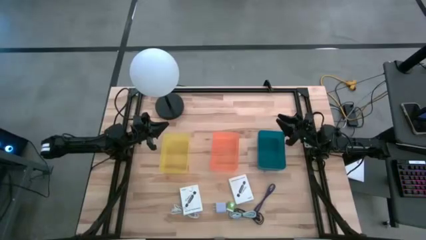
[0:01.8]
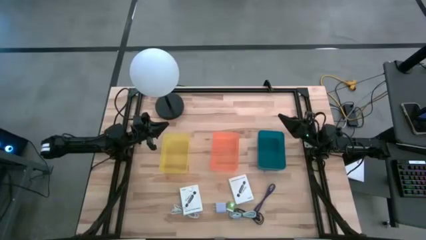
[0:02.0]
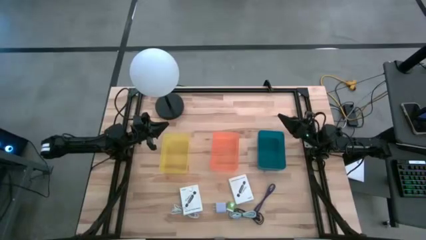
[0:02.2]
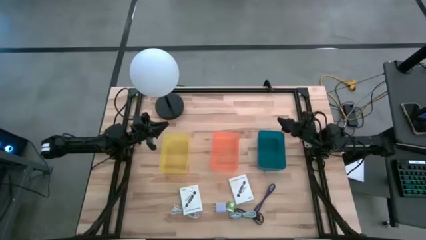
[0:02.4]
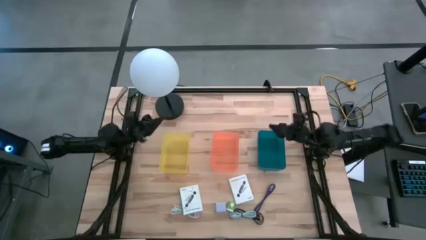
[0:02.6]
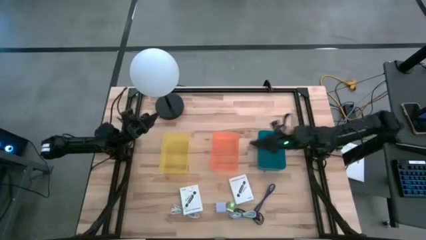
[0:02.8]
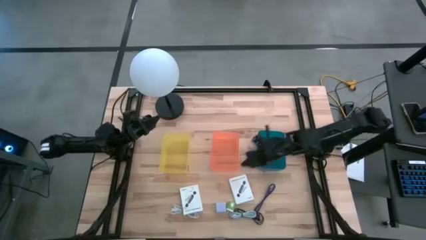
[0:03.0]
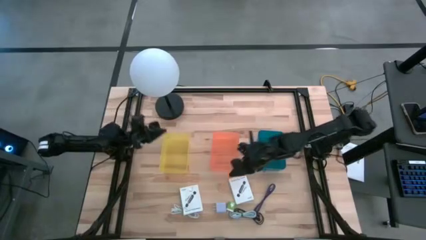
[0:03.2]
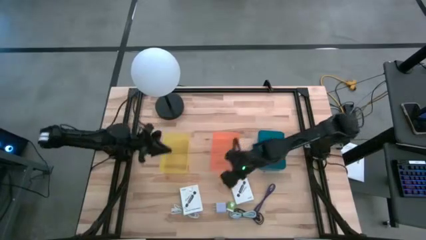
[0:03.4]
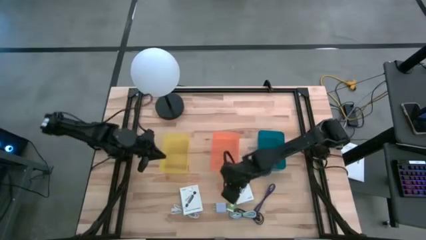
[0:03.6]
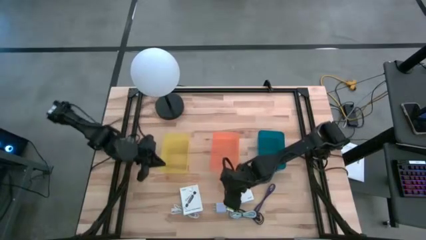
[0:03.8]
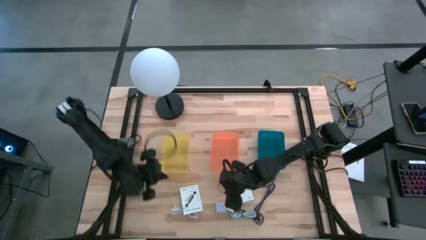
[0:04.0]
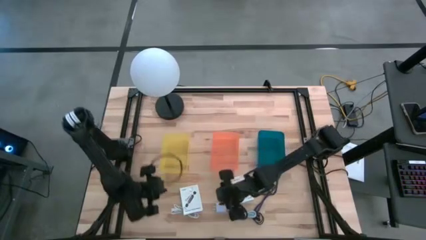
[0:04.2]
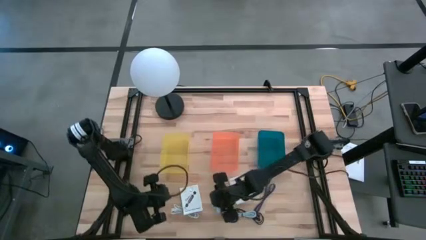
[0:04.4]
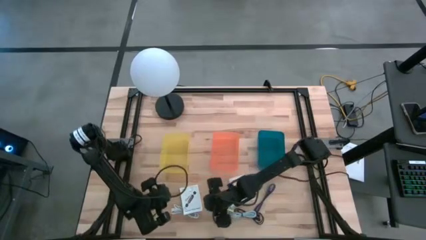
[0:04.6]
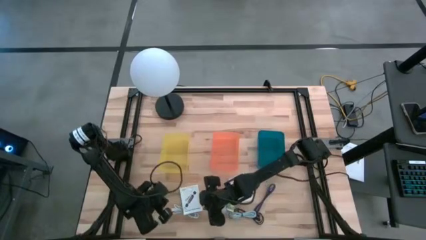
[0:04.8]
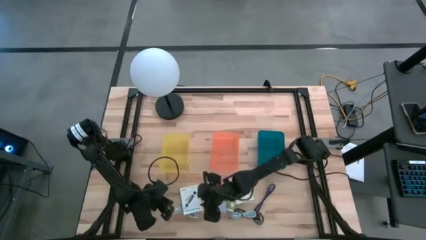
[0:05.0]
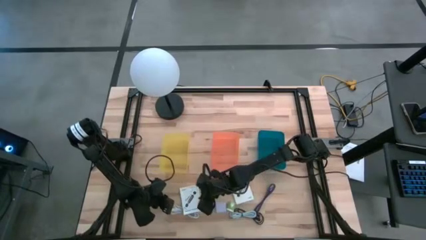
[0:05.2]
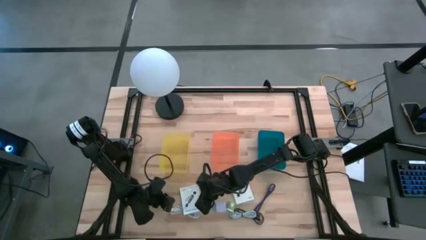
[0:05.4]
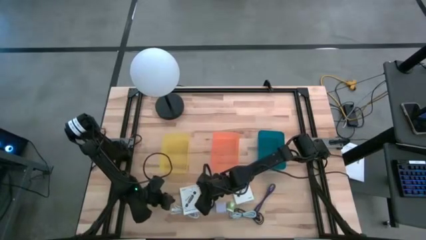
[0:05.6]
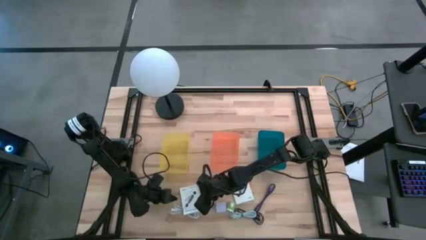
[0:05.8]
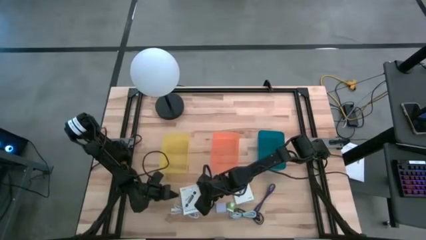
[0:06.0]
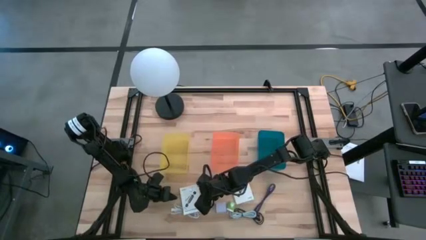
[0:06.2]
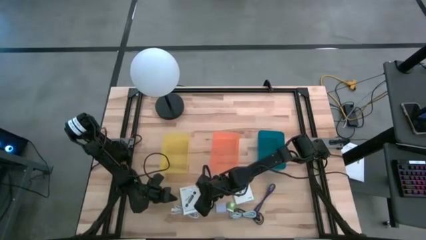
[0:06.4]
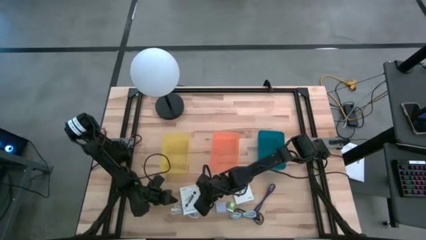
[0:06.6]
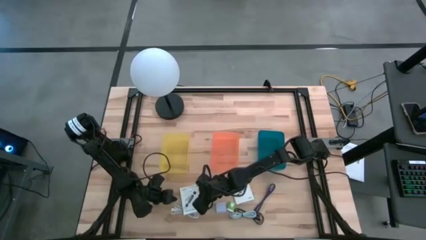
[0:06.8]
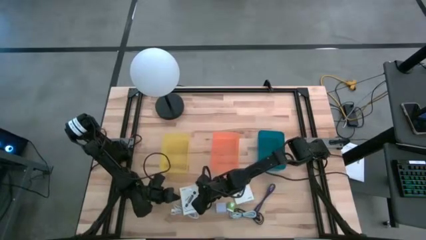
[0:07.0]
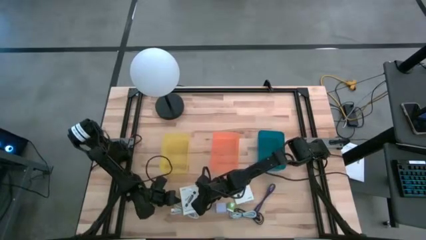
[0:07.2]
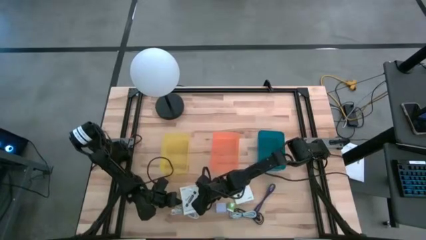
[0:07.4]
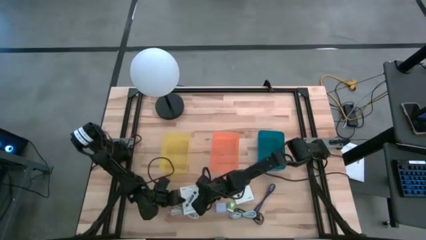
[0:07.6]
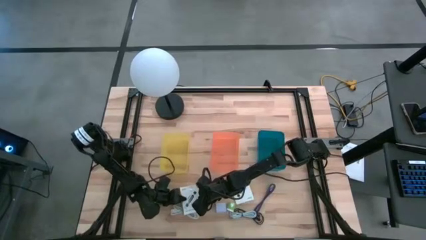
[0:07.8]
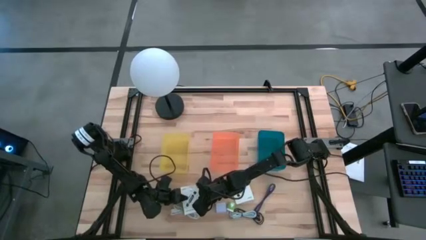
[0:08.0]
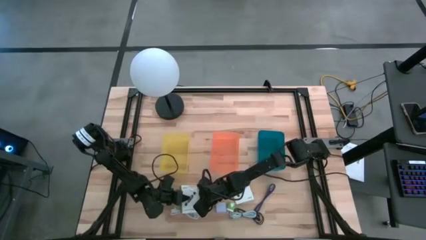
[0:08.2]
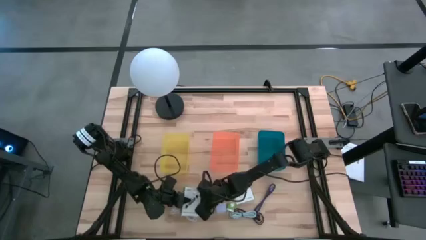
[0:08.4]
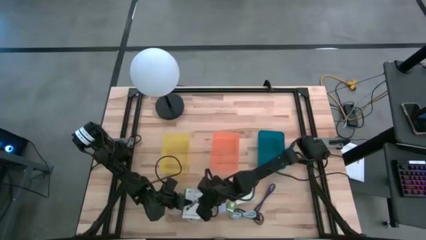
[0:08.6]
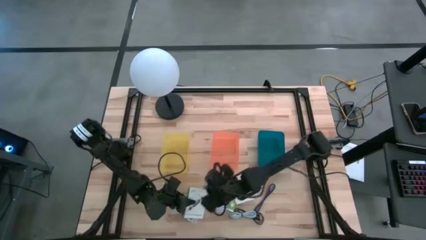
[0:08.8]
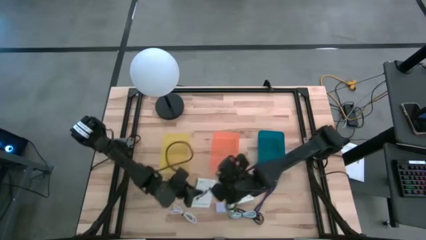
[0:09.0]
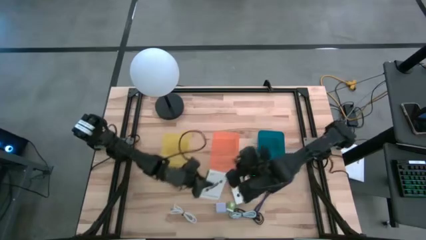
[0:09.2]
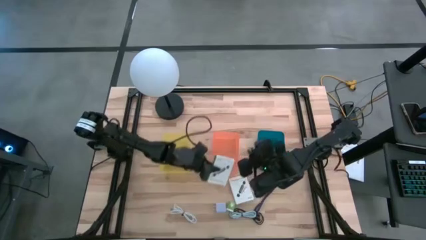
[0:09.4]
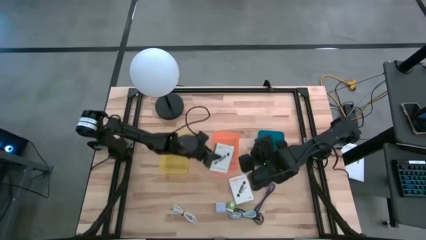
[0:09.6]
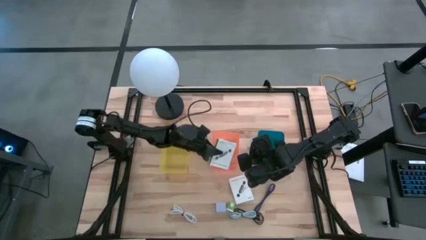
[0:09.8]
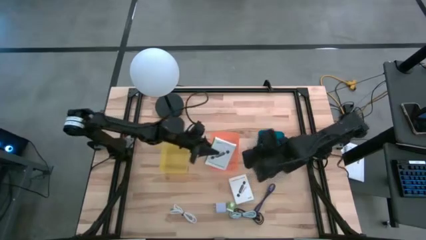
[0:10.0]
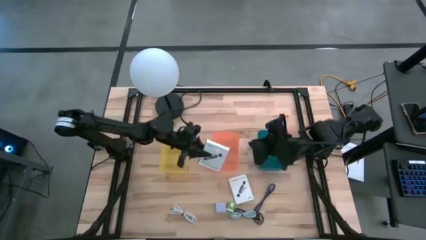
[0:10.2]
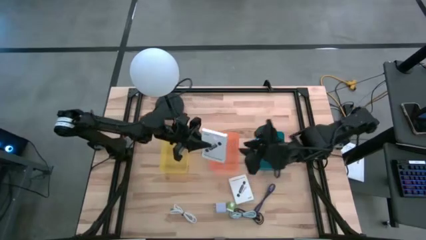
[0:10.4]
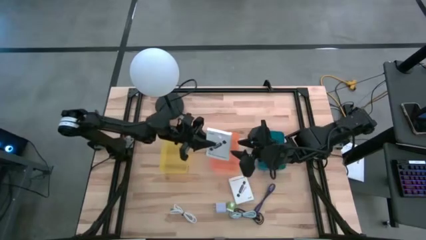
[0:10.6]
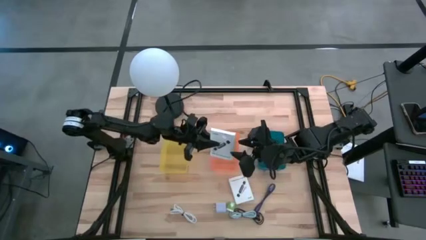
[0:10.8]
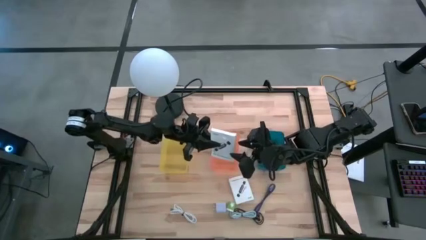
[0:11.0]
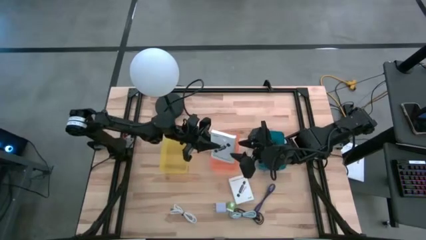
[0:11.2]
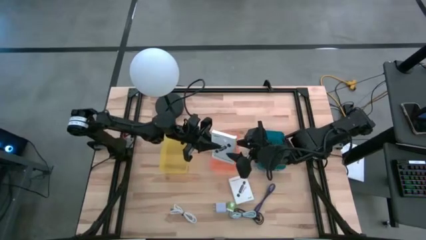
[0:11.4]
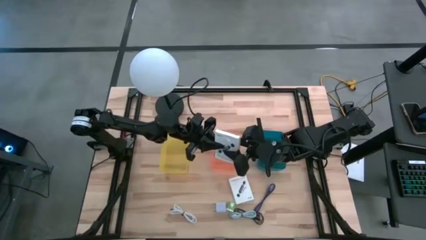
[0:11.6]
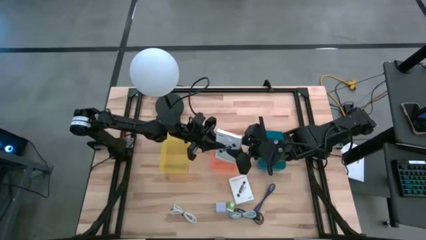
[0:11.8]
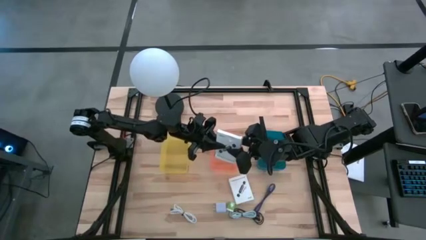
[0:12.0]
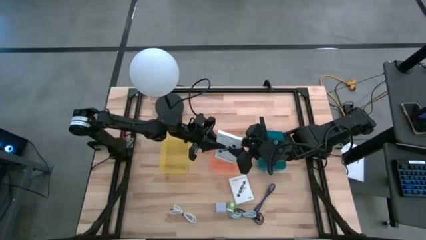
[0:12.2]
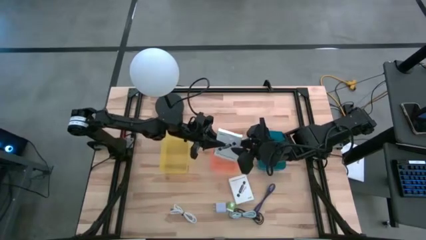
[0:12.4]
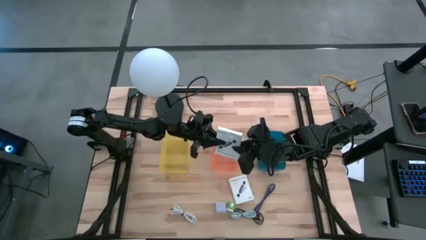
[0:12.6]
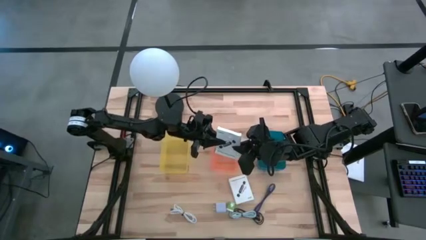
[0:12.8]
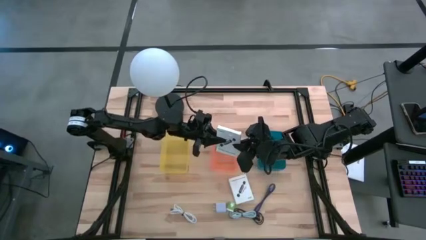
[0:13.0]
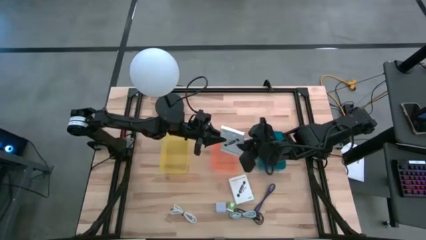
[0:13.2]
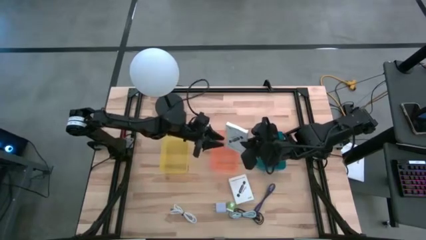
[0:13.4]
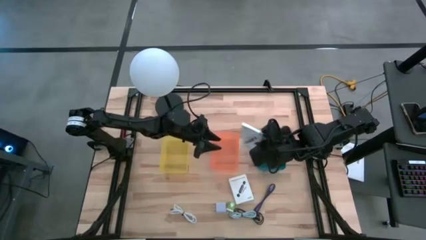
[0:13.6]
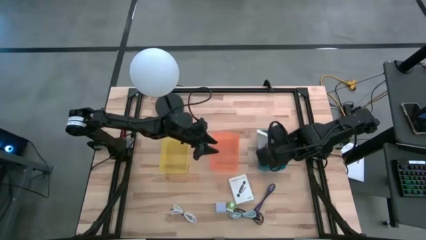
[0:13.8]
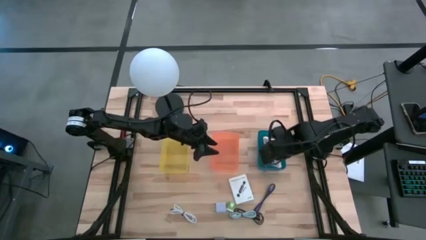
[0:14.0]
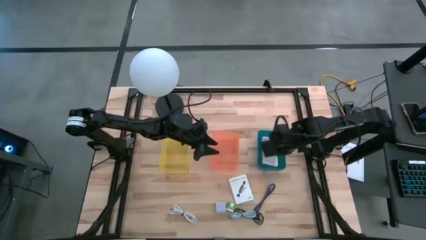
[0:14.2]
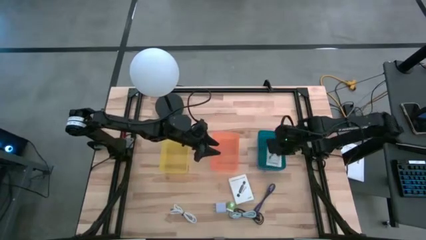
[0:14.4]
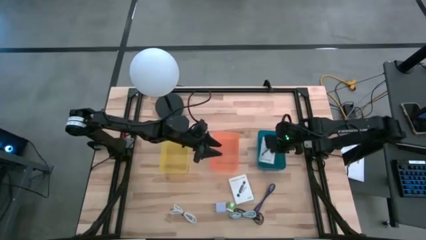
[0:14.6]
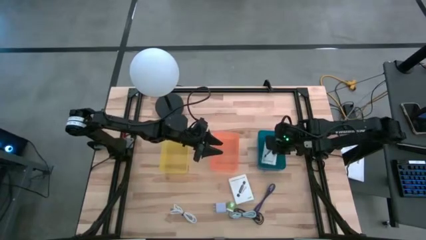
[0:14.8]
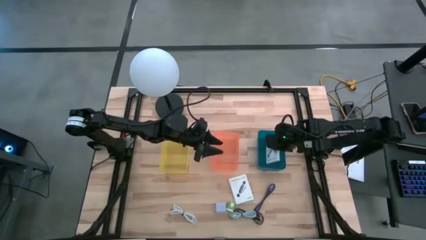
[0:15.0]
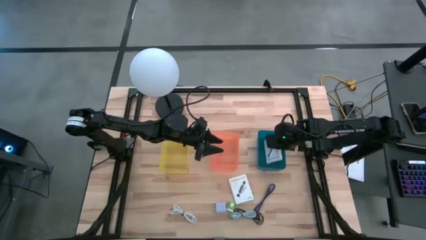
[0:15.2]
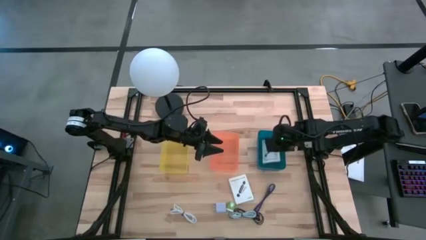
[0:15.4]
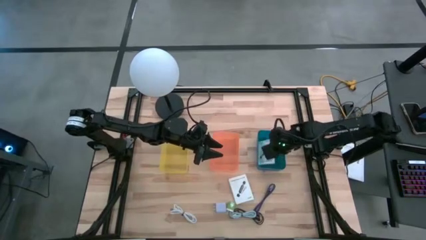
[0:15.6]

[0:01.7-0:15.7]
Task: Pick and place items into bin
Put the left card reader box into the blue bin
